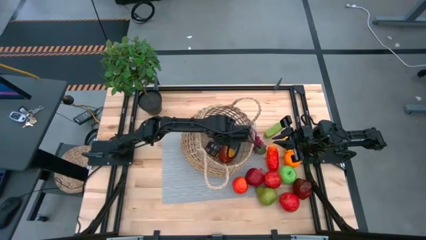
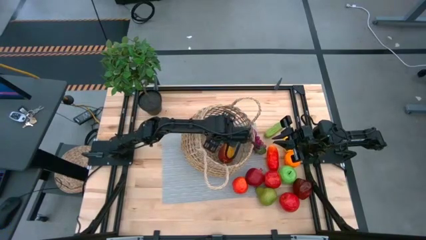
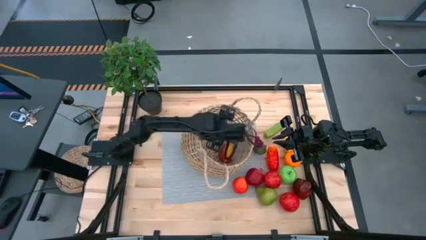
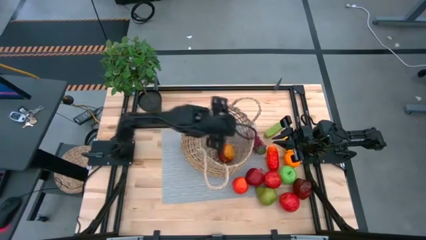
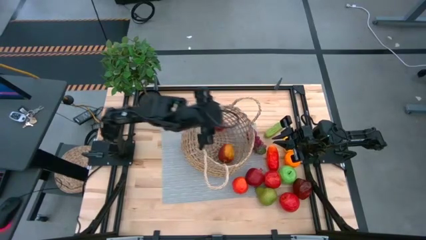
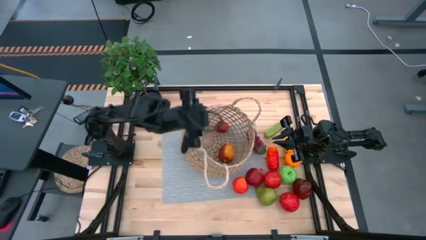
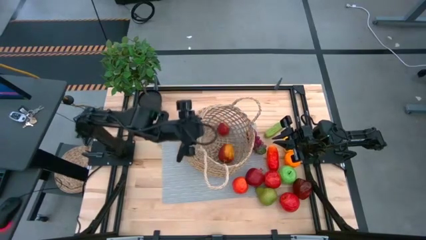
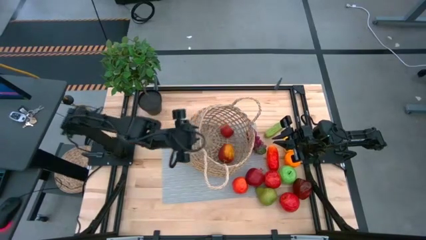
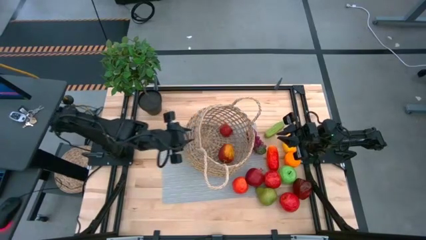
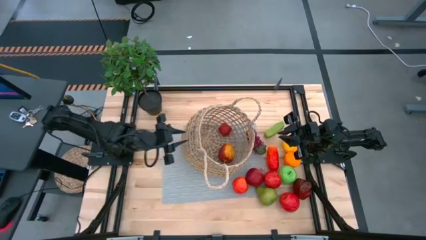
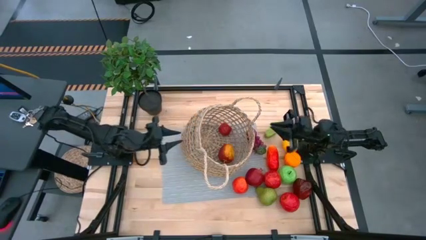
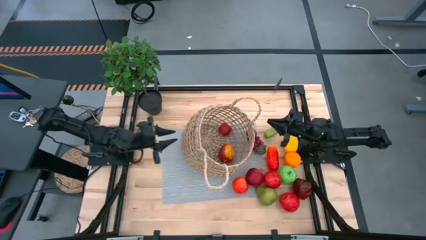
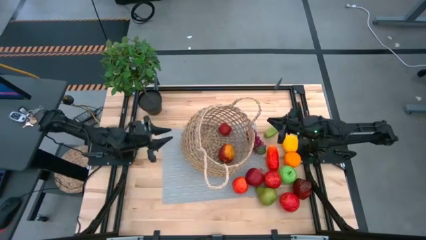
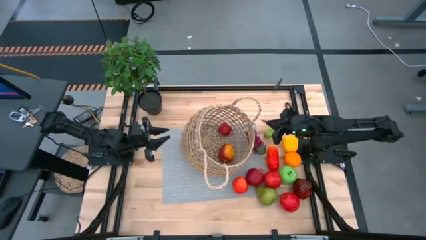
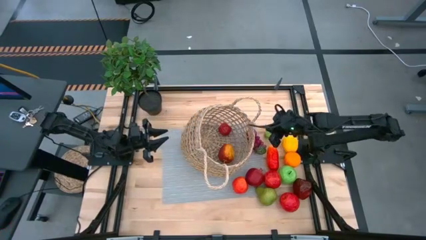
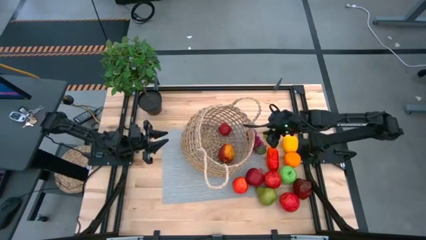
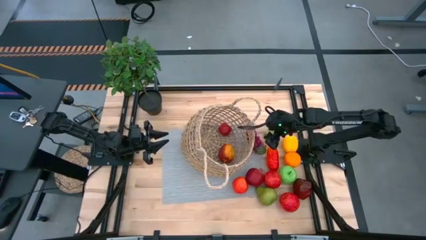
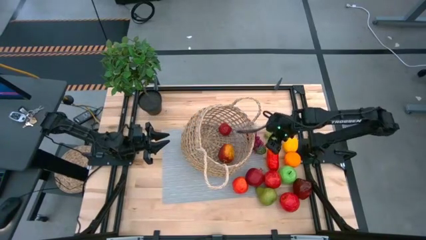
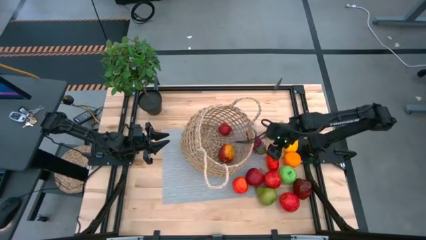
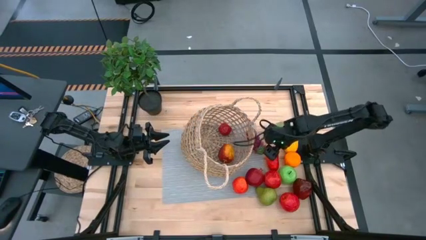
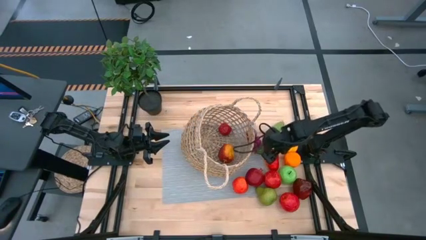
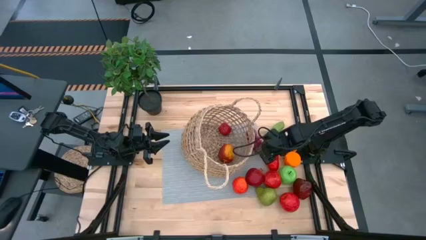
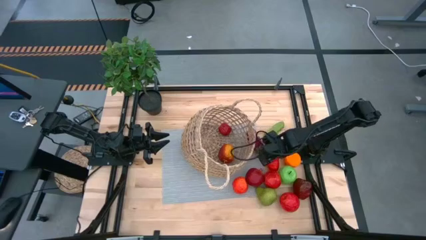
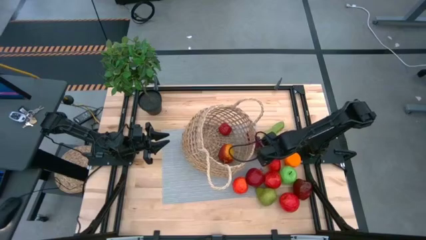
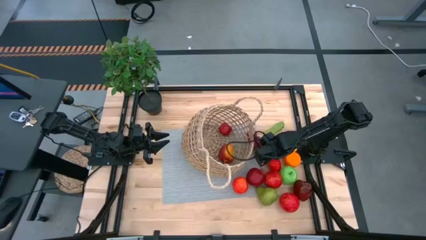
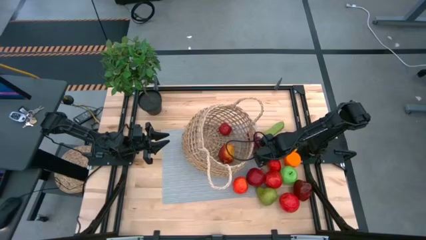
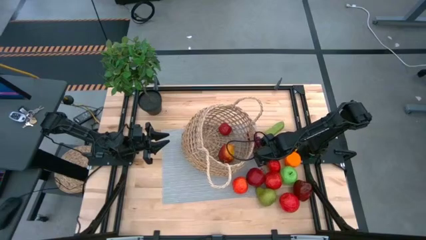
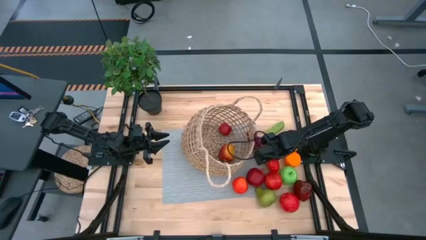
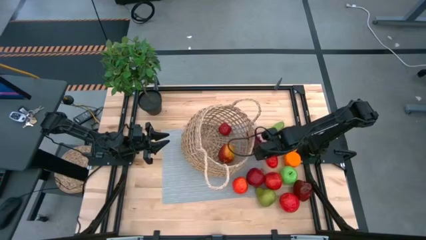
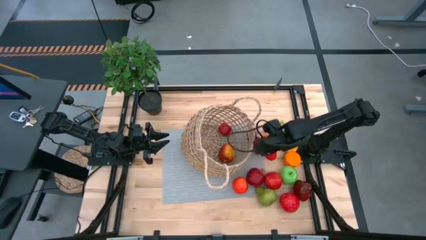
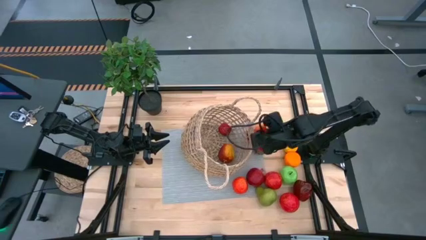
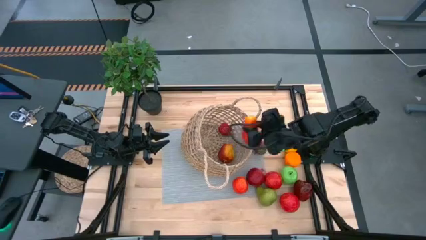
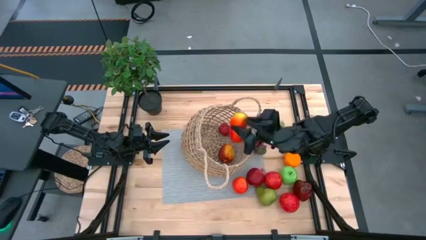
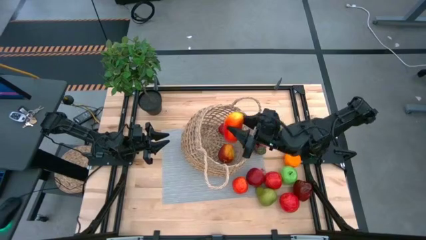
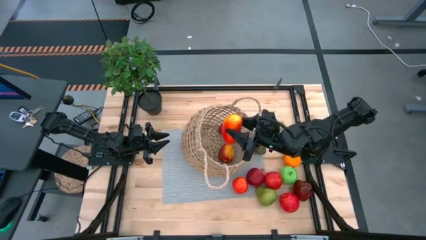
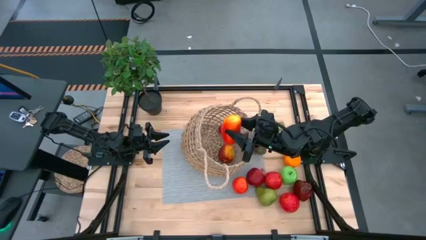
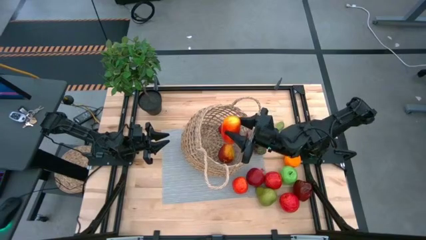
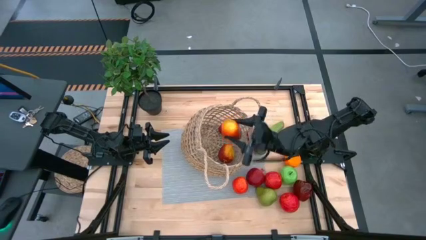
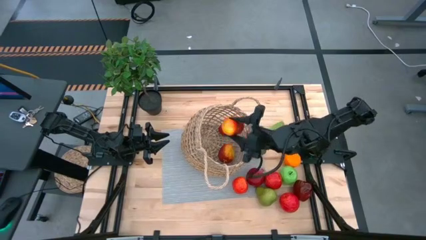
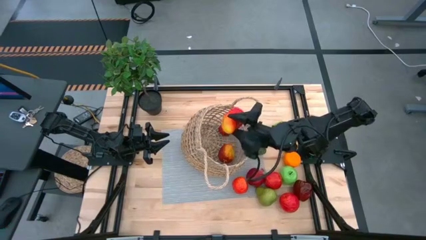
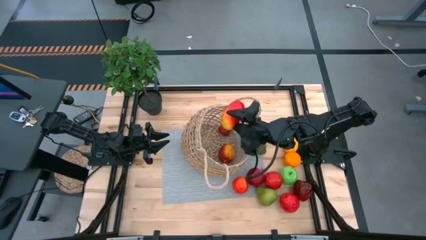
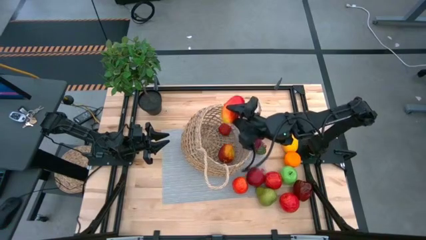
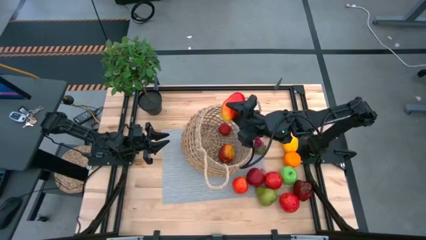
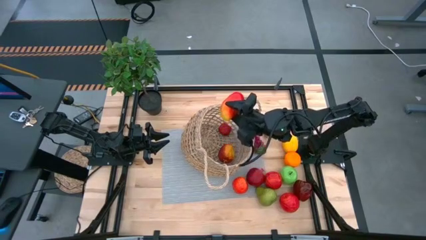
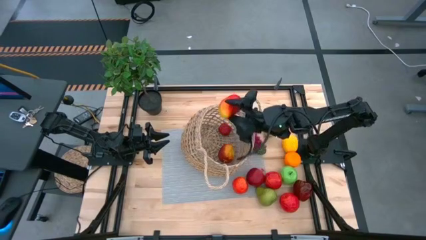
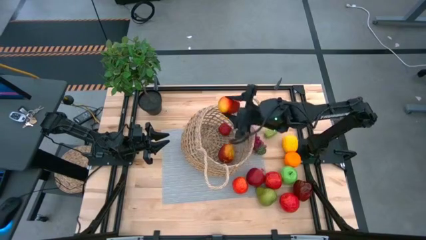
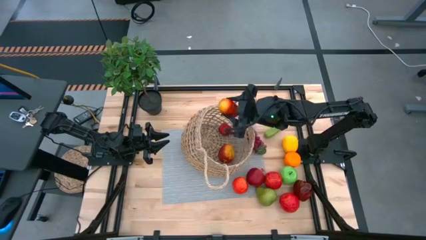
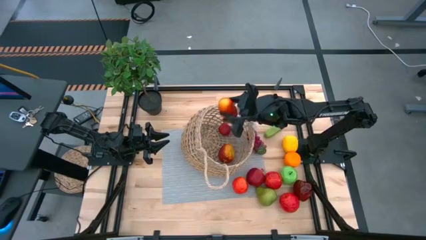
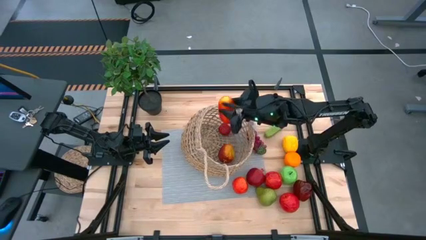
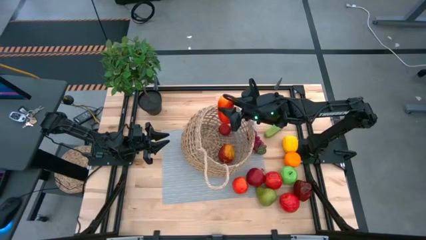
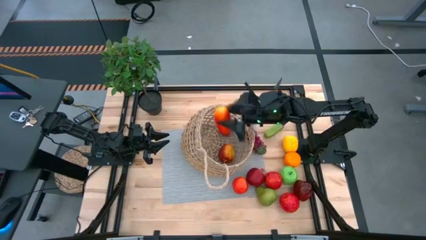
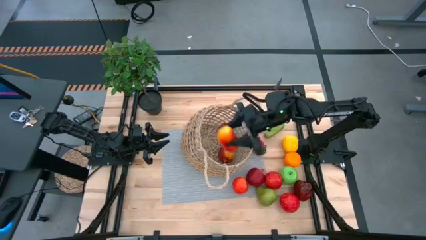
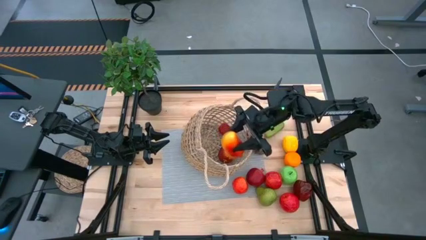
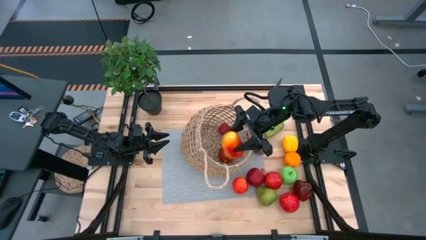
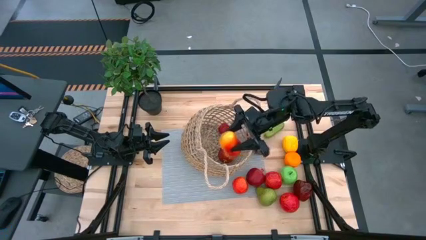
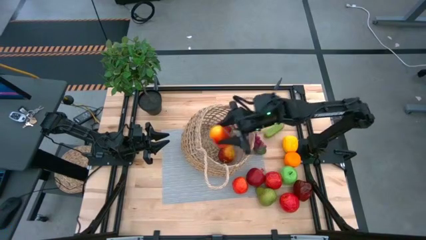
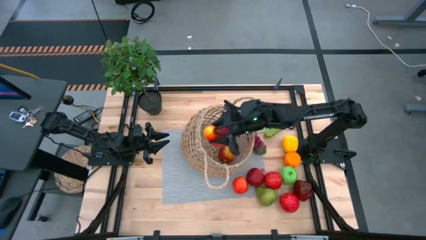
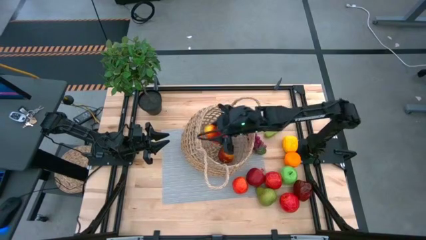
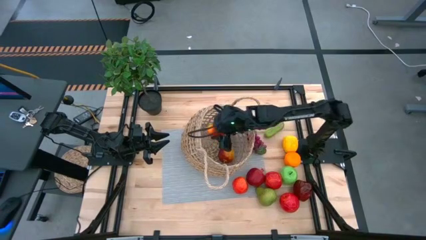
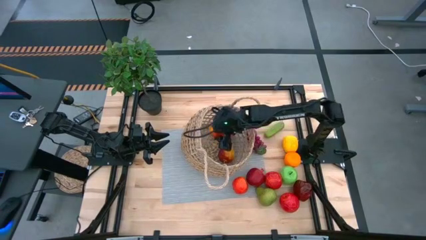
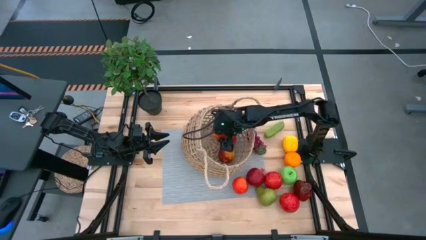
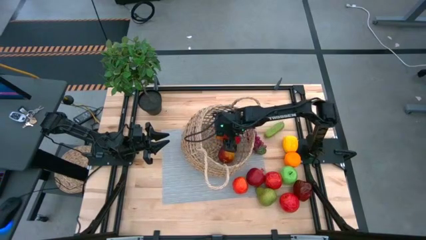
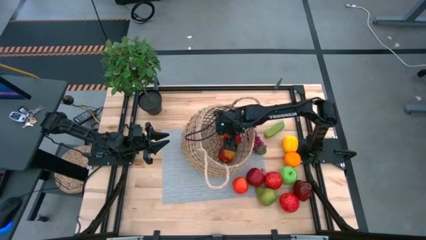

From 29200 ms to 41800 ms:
Task: Build produce basket
Put the red mango into the brown basket

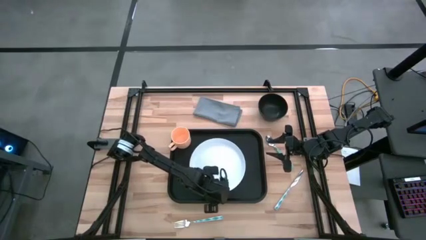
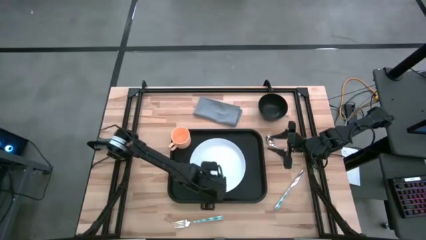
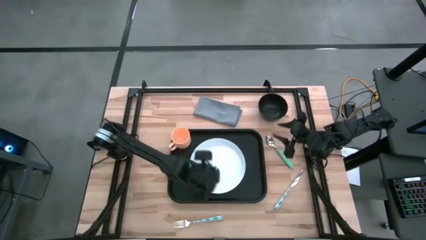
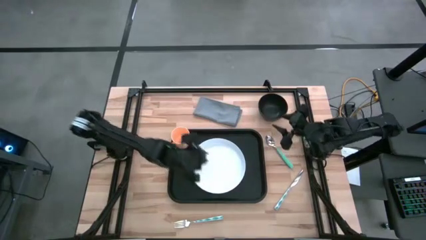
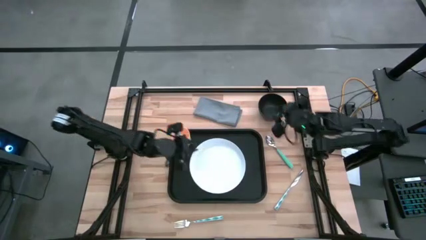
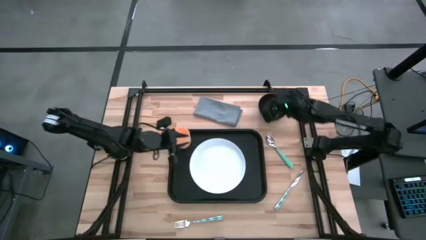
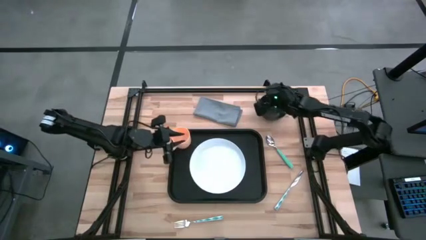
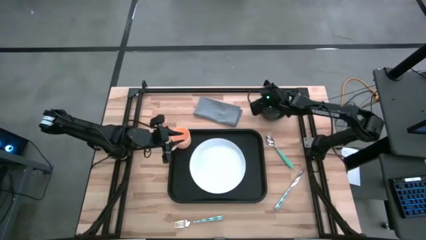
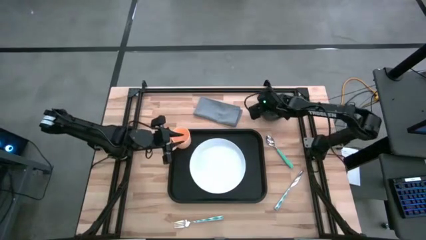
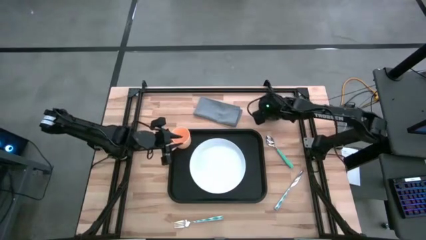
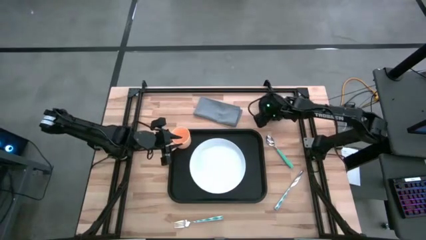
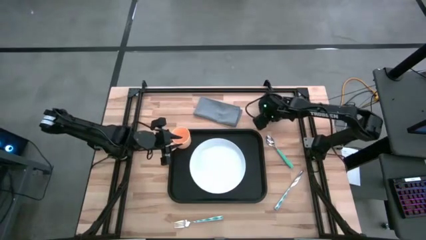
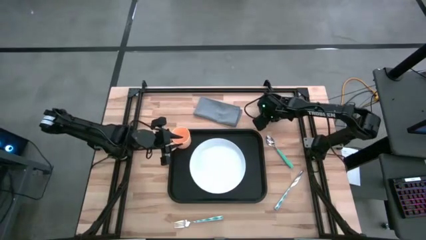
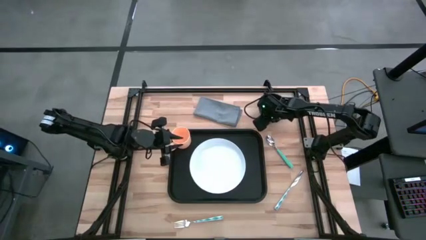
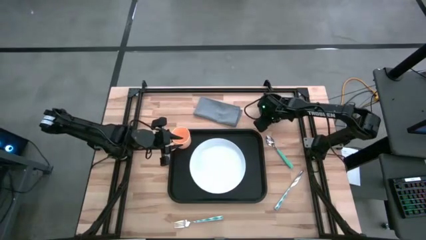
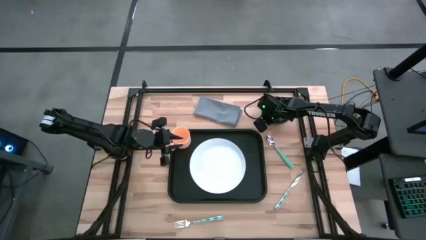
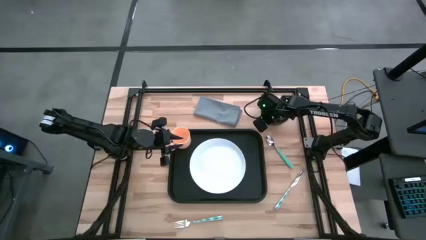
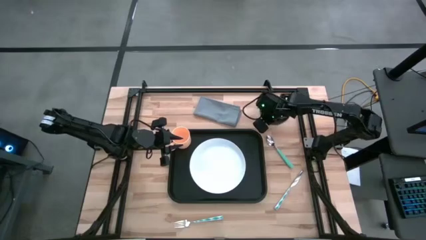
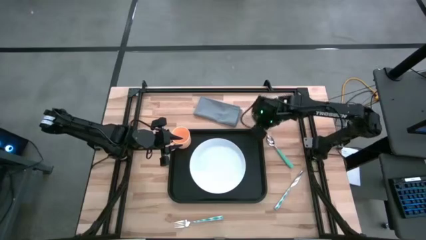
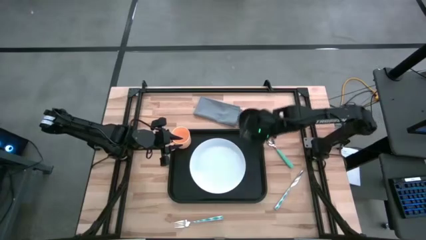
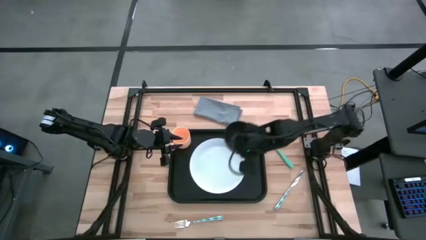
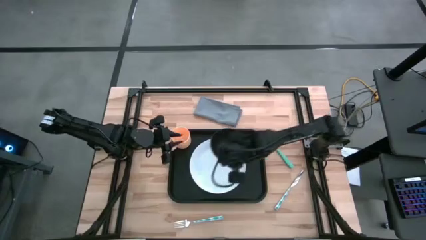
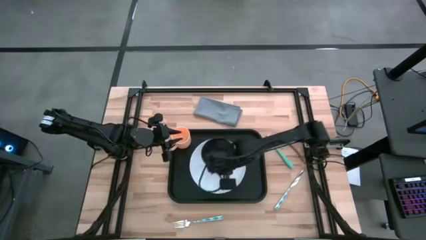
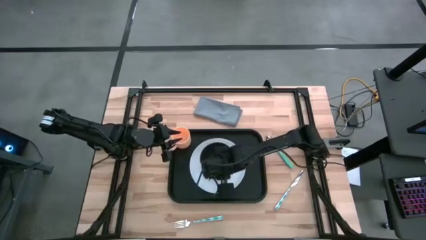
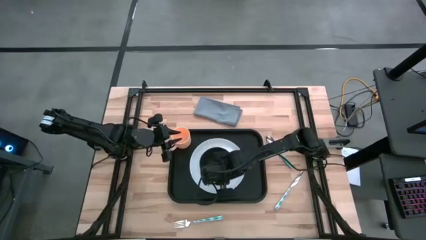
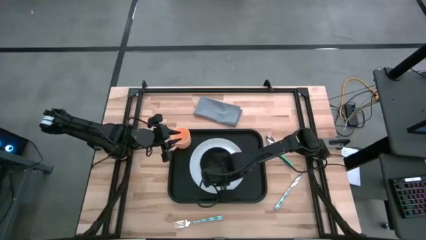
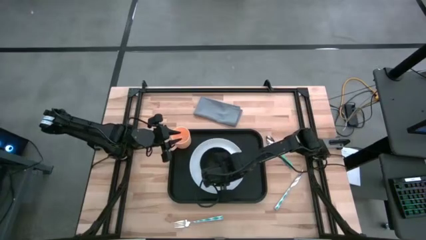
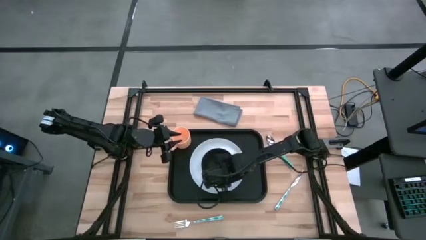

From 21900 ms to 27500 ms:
Task: Set up tray
Put the black bowl on top of the white plate on the black serving tray
